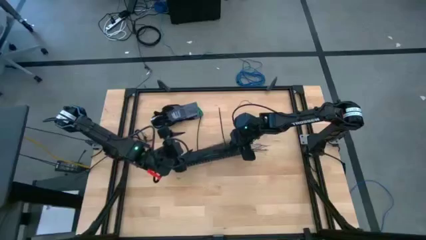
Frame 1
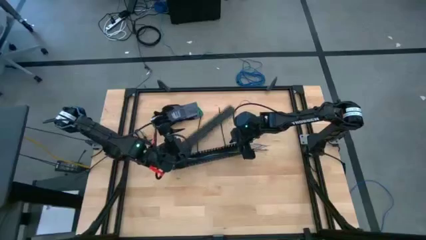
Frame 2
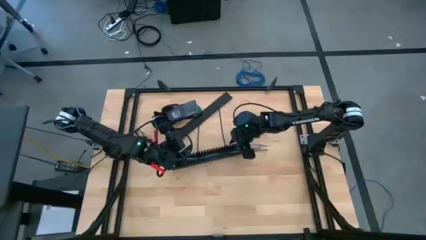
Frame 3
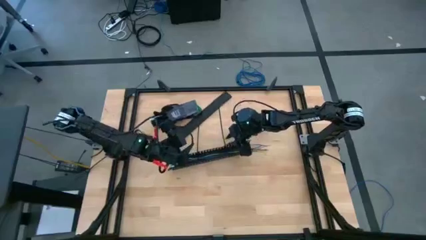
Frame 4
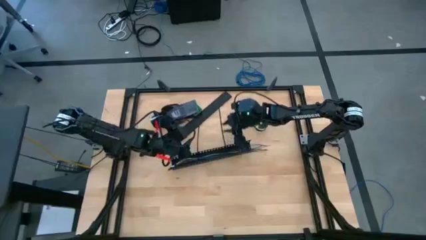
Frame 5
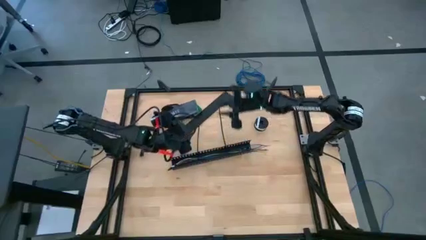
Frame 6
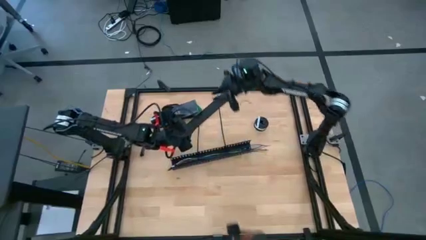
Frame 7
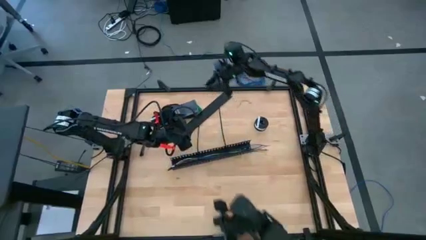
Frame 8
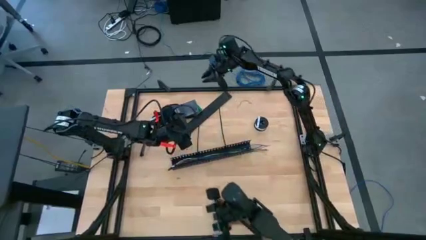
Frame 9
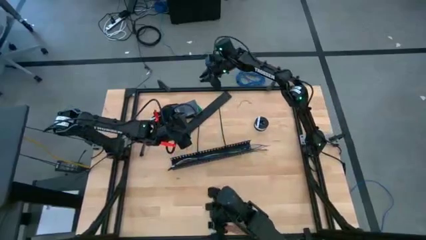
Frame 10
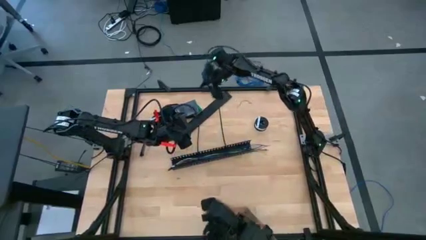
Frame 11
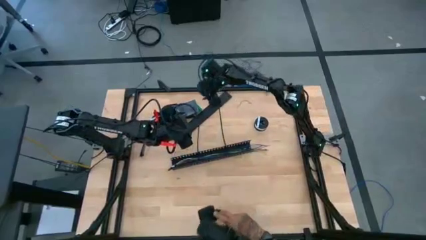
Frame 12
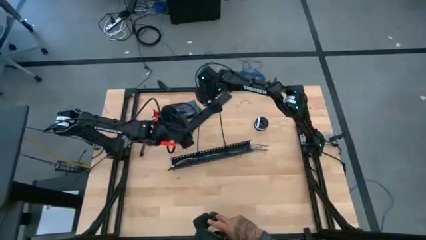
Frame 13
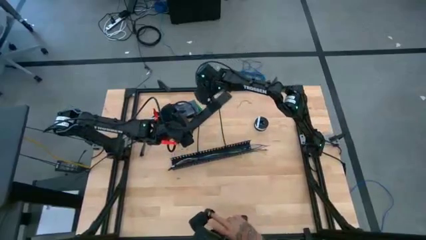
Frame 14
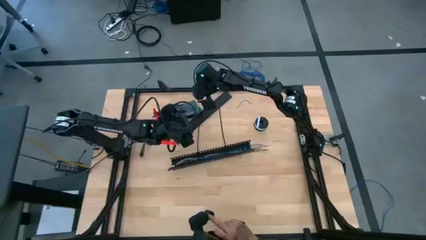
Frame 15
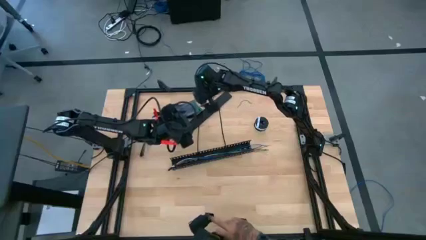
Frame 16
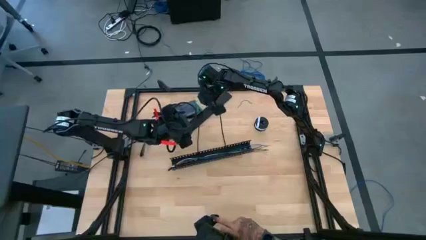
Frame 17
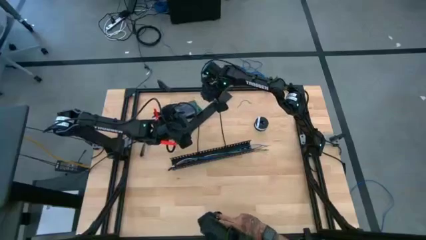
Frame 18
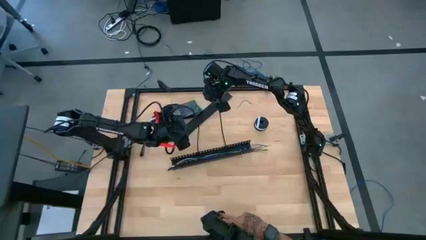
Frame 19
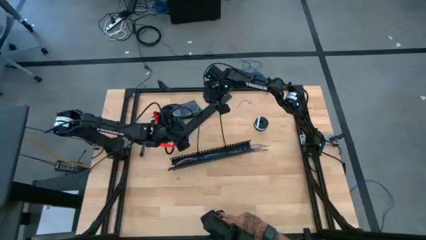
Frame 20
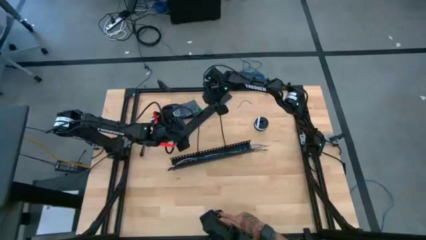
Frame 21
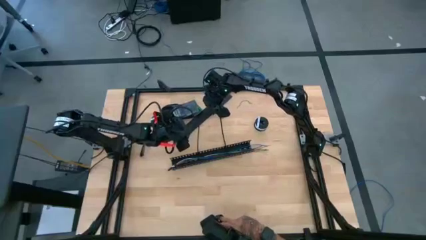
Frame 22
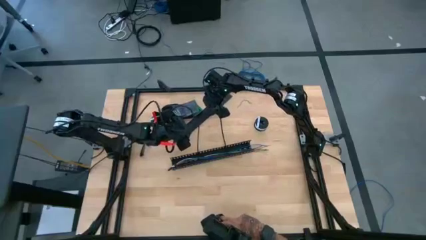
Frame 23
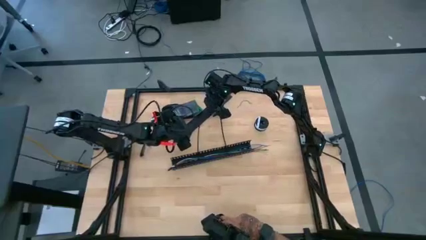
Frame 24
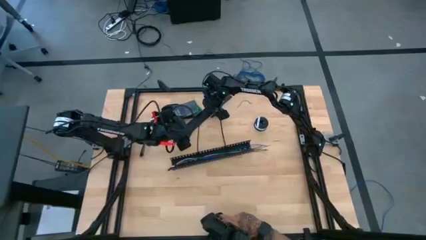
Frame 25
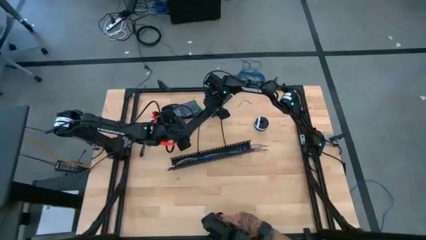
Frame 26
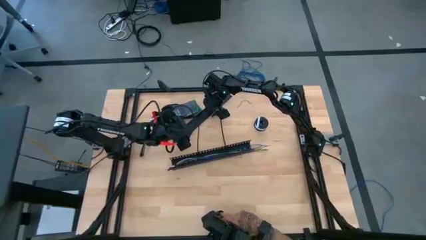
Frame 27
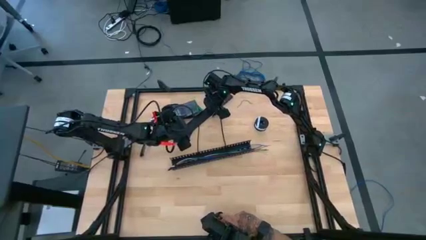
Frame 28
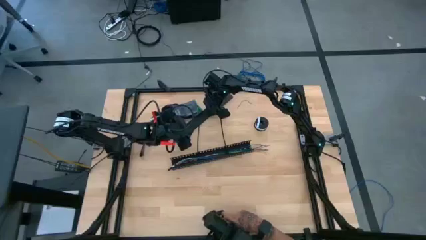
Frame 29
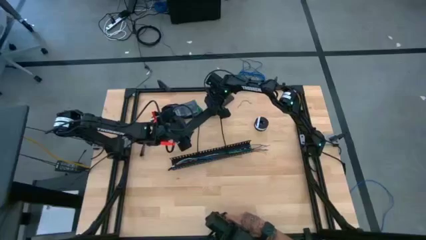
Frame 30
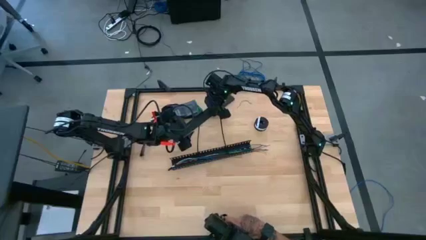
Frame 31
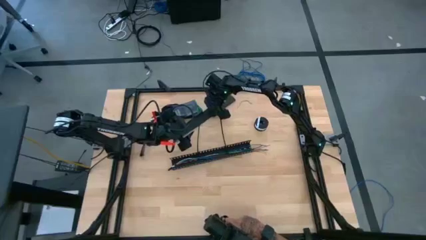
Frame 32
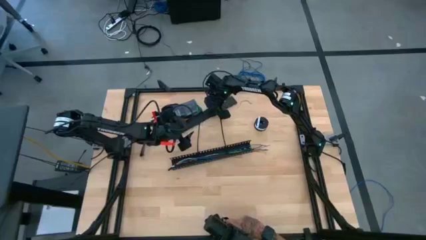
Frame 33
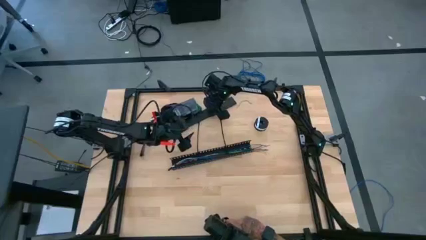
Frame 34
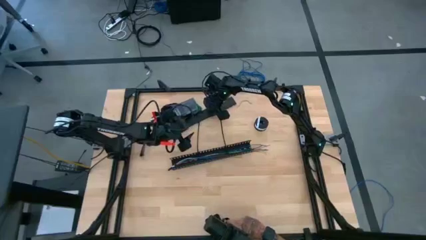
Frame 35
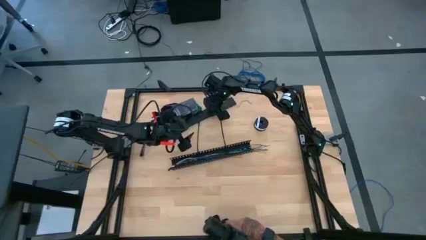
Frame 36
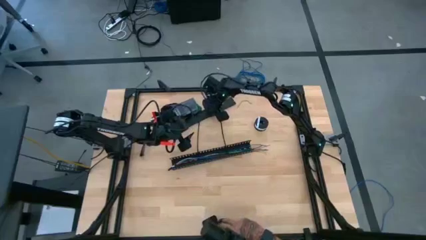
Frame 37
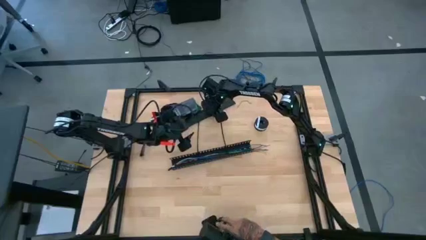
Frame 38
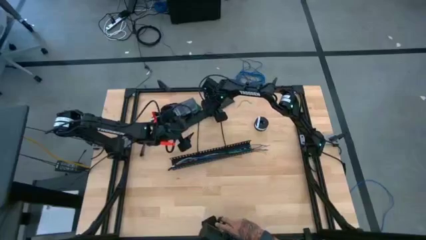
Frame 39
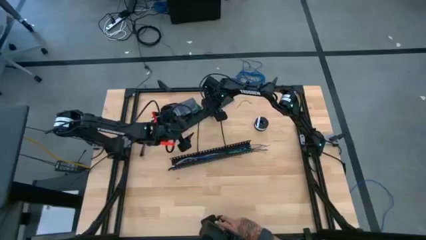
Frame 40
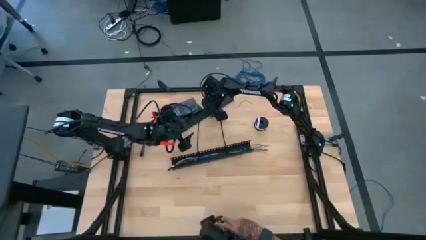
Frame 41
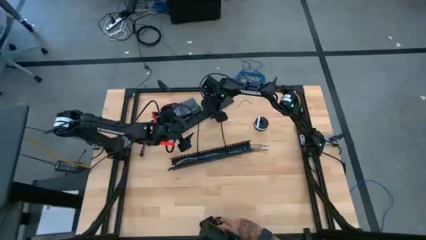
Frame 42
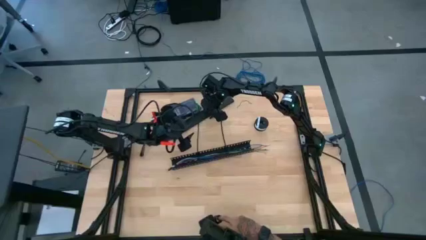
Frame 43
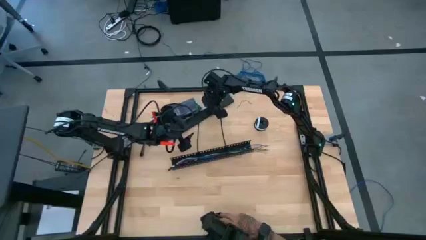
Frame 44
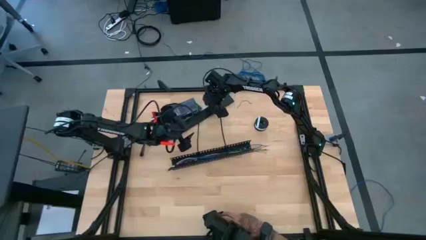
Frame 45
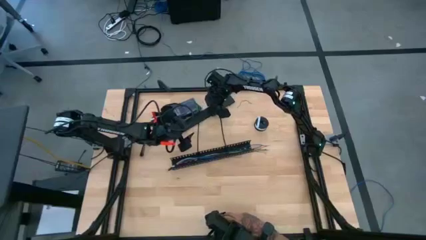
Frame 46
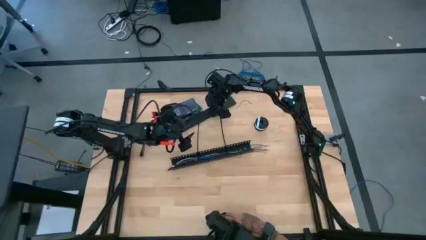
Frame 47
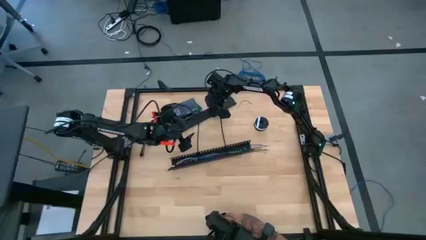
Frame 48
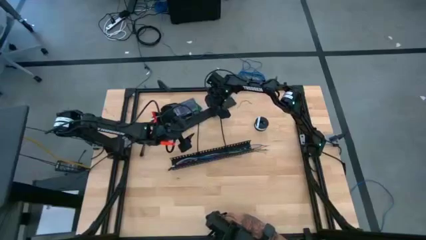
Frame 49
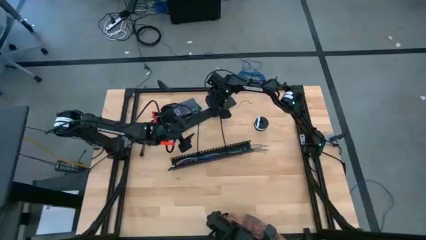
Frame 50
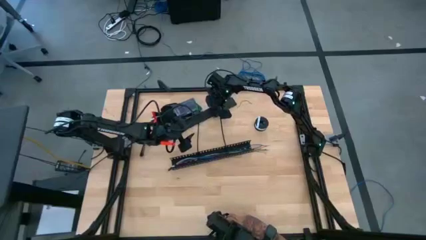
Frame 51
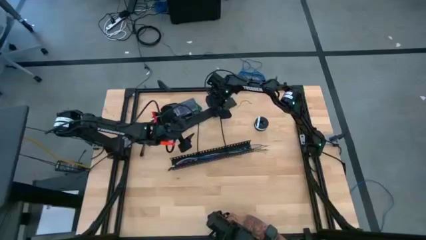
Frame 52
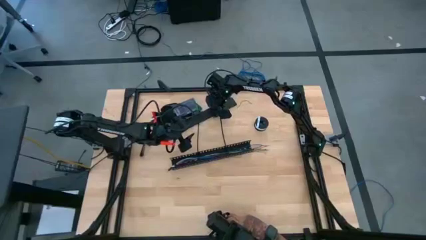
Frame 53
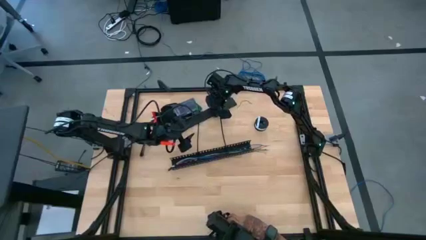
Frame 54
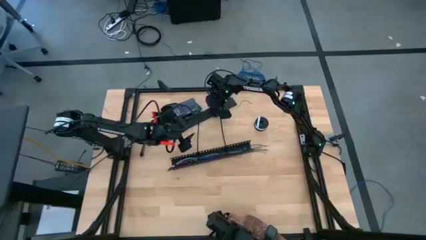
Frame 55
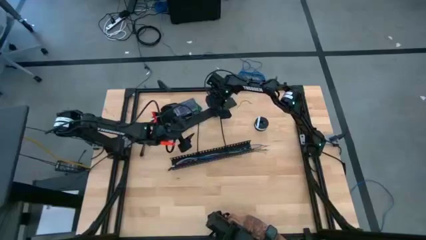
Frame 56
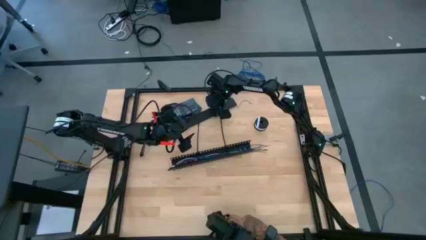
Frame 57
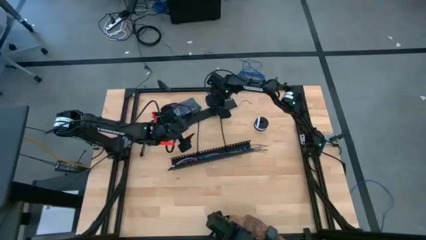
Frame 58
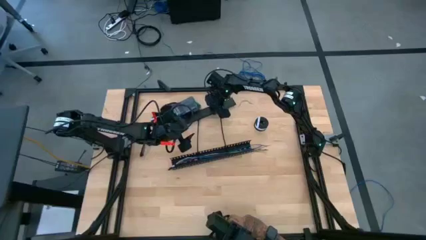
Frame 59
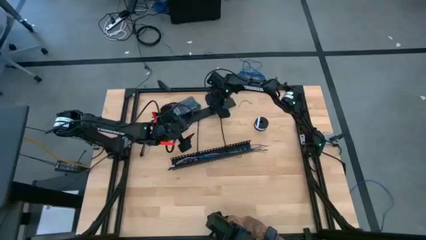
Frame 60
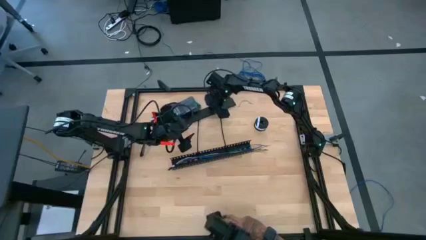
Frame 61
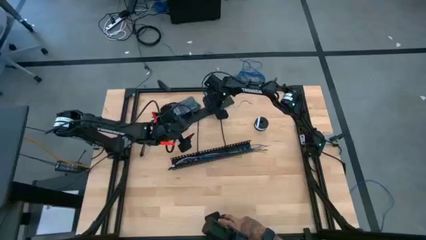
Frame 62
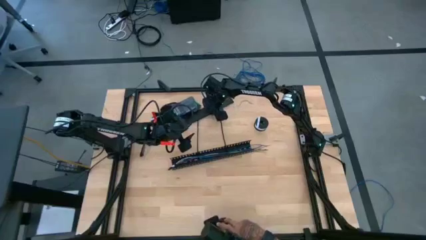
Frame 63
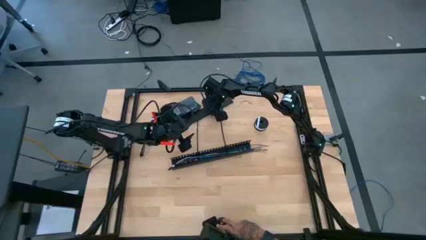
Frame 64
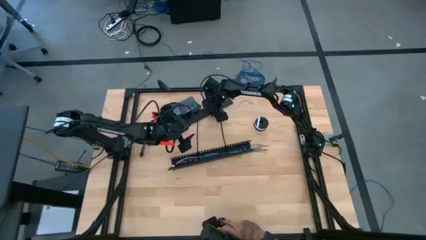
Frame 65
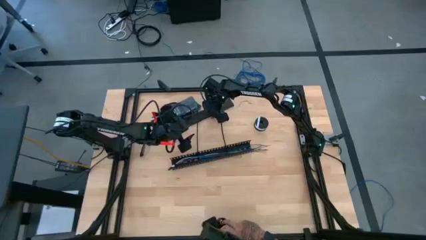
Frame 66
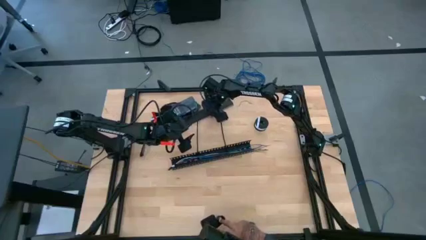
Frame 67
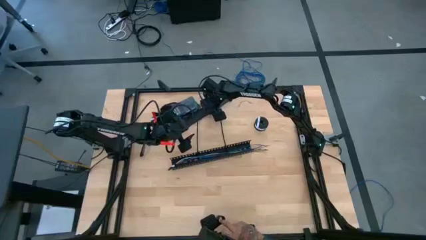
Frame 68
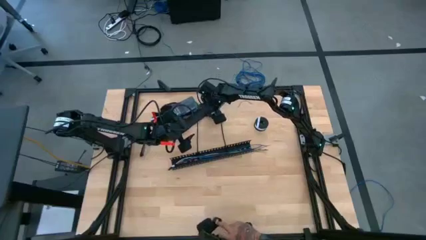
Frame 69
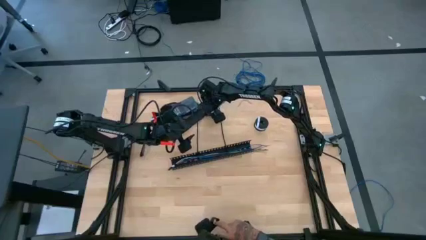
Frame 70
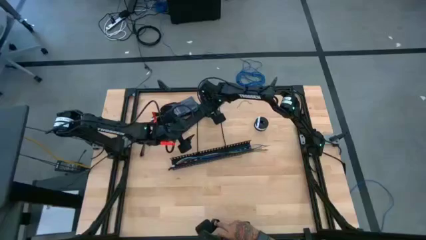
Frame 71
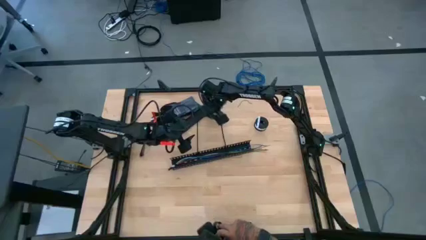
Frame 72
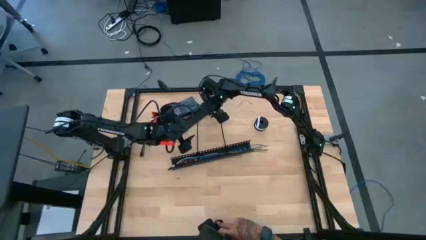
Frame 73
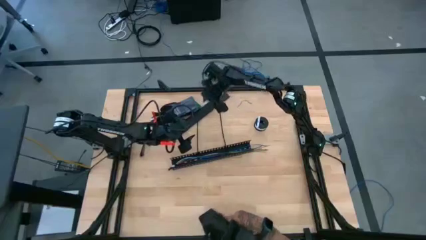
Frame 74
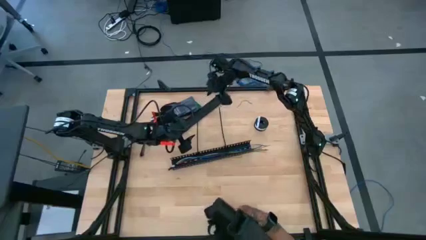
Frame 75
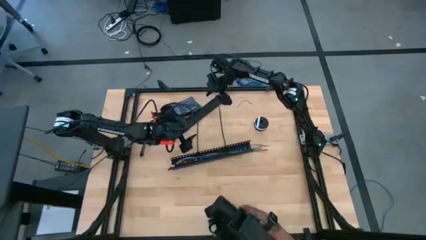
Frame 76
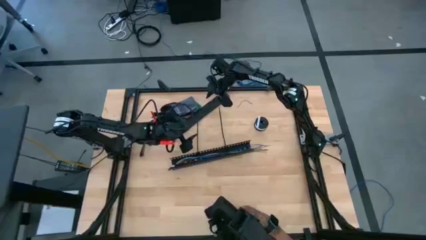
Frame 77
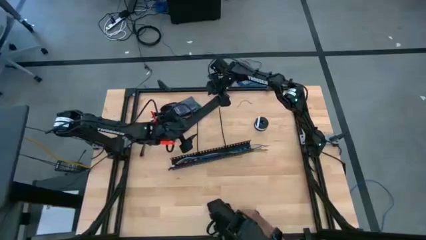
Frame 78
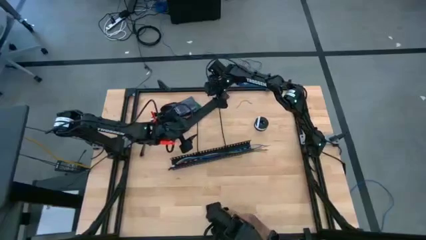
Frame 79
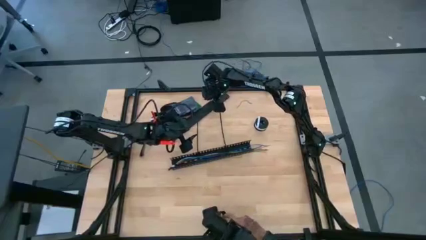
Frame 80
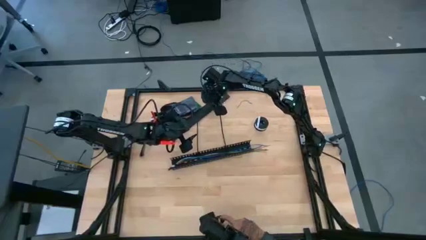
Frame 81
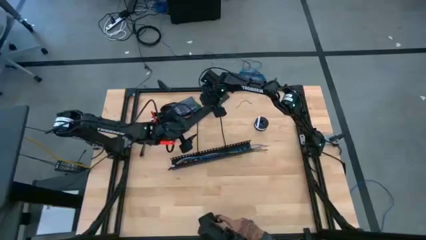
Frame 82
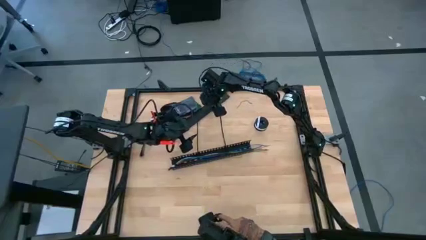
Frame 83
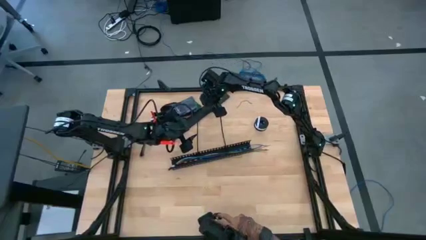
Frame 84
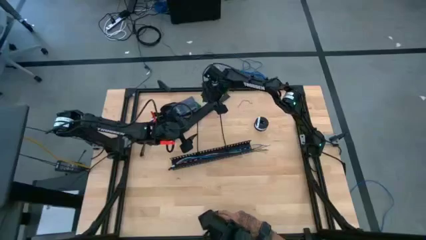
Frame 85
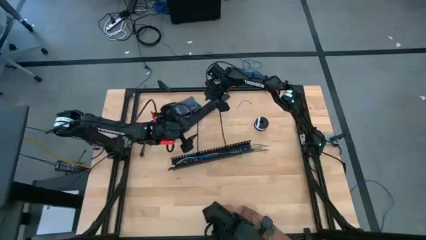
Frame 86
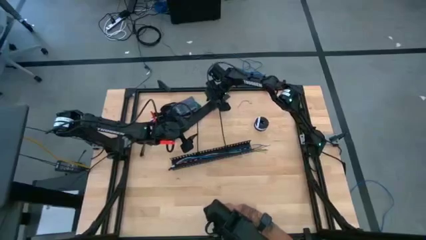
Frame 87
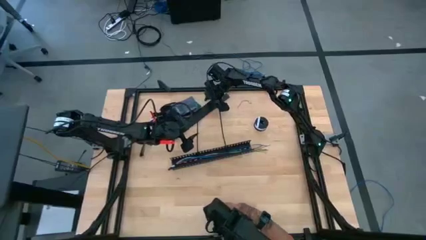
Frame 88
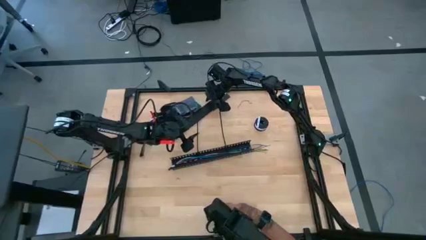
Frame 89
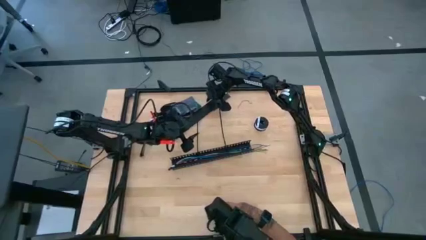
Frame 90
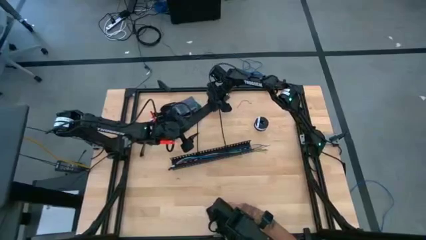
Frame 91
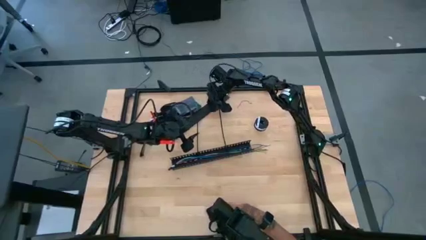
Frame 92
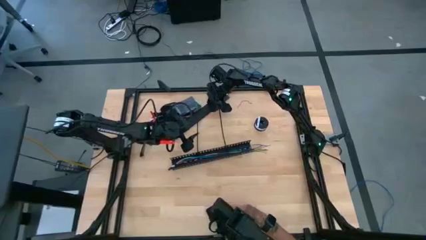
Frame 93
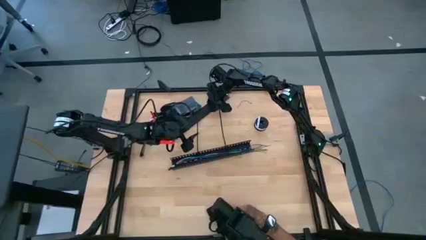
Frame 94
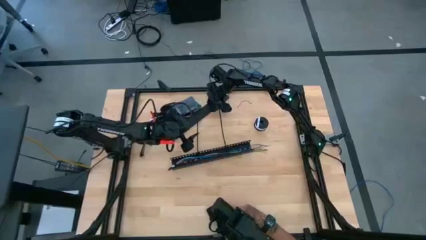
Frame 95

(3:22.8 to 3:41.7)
Task: Ziptie cables
Close the black cable duct
